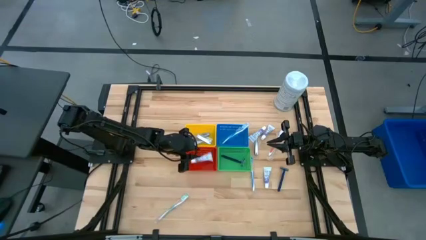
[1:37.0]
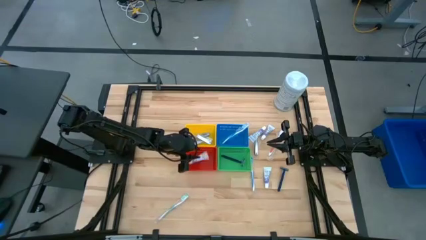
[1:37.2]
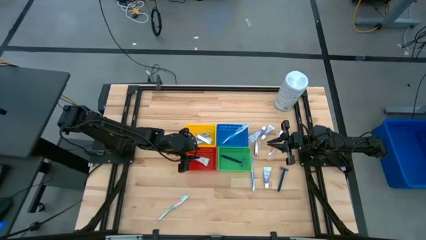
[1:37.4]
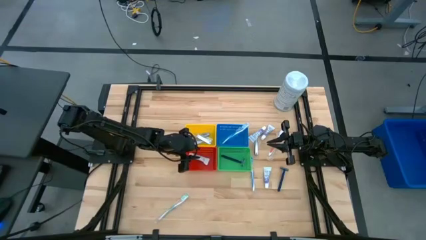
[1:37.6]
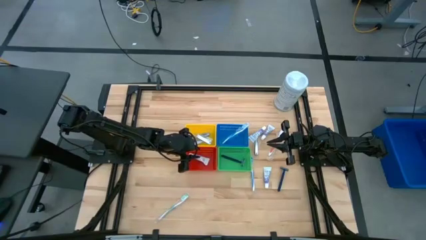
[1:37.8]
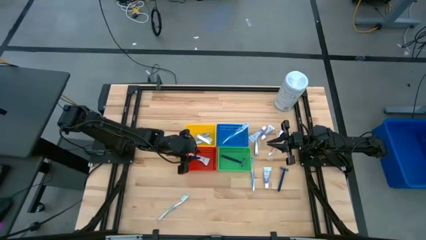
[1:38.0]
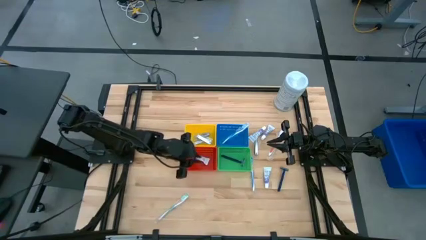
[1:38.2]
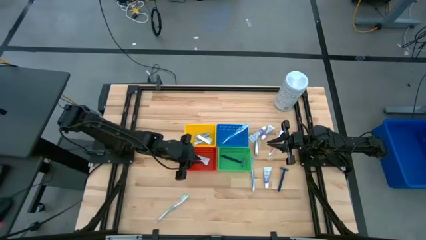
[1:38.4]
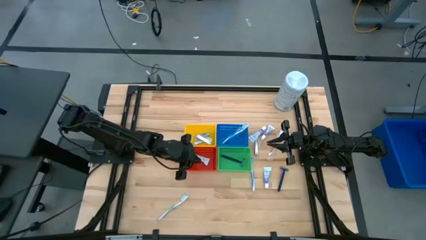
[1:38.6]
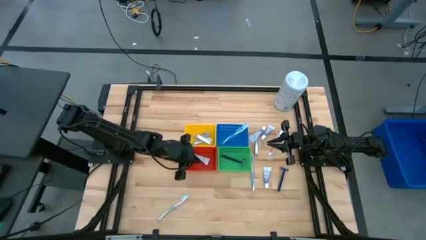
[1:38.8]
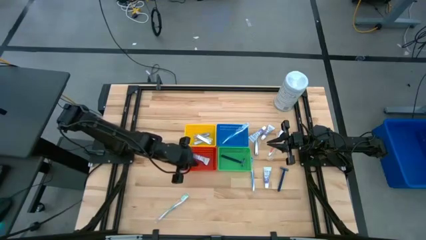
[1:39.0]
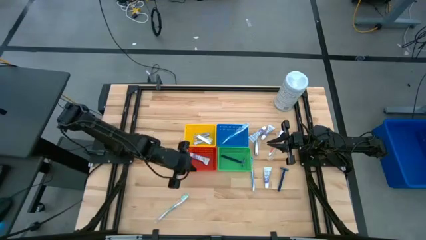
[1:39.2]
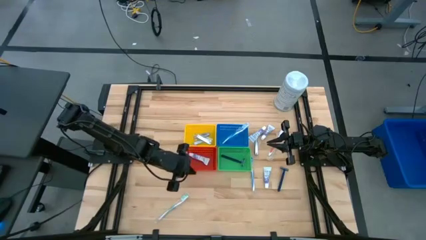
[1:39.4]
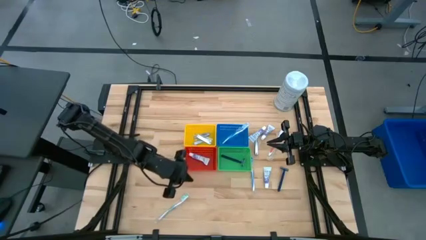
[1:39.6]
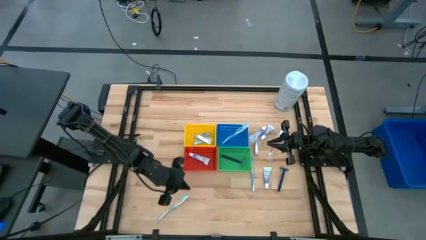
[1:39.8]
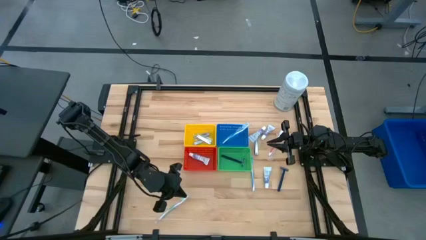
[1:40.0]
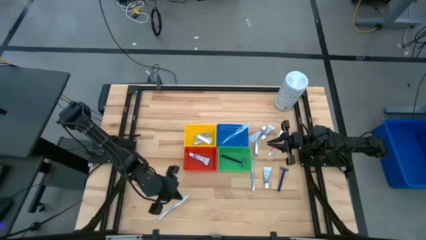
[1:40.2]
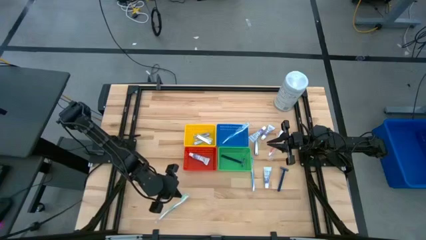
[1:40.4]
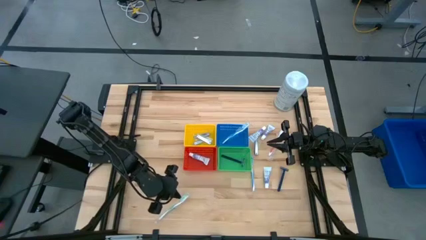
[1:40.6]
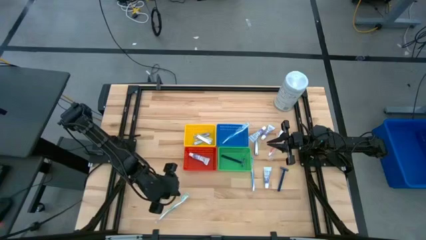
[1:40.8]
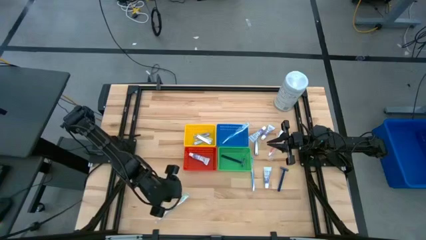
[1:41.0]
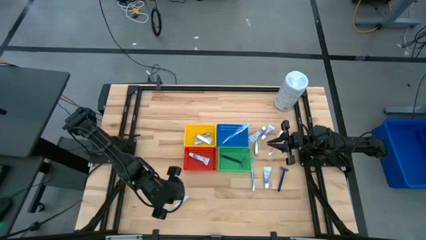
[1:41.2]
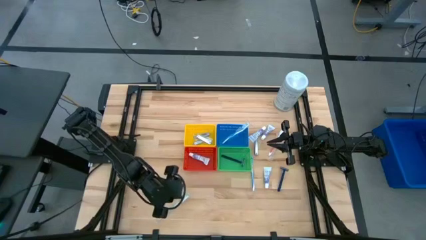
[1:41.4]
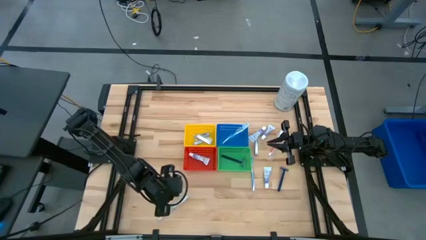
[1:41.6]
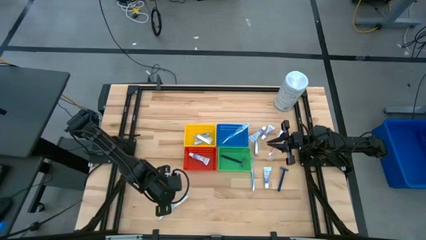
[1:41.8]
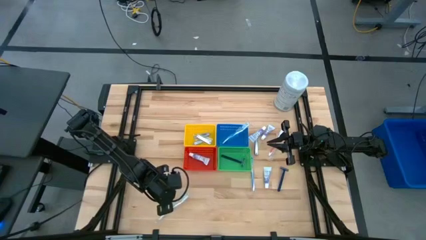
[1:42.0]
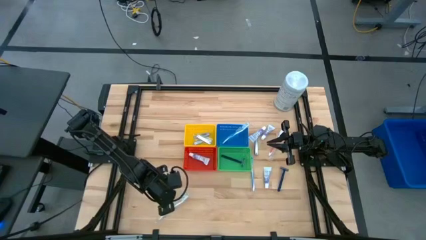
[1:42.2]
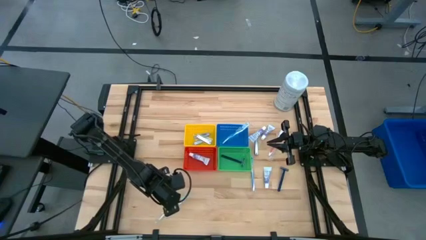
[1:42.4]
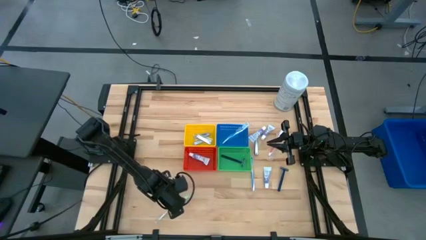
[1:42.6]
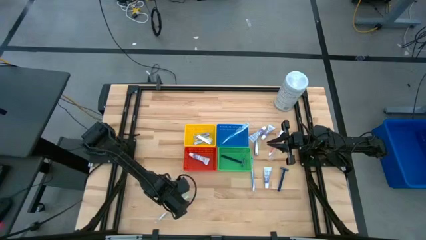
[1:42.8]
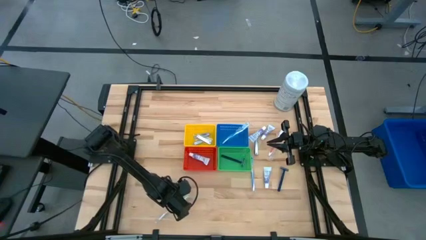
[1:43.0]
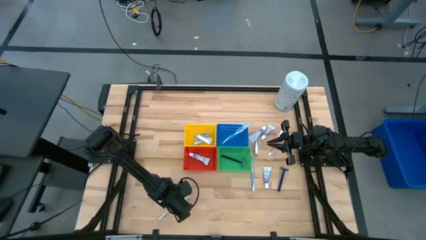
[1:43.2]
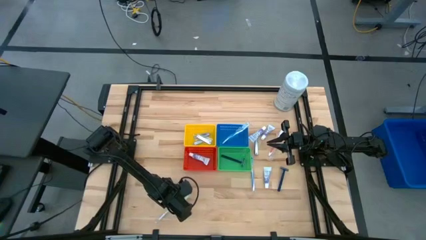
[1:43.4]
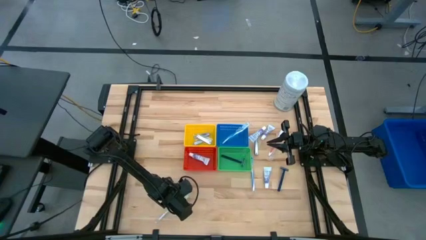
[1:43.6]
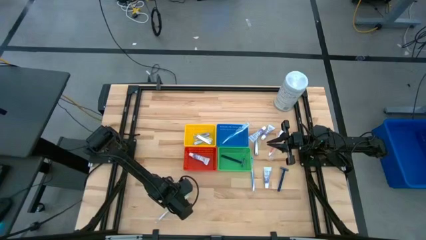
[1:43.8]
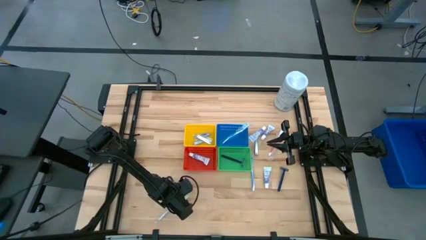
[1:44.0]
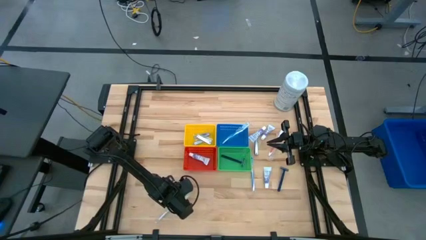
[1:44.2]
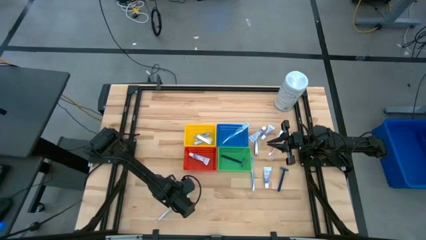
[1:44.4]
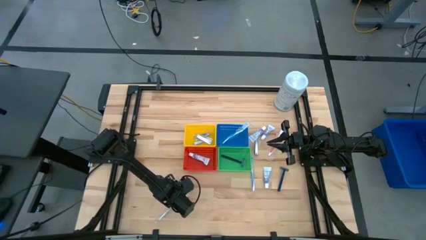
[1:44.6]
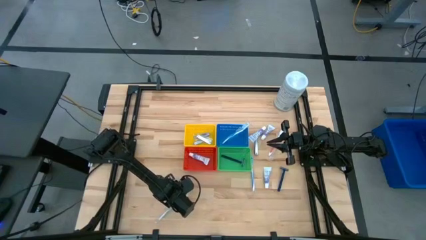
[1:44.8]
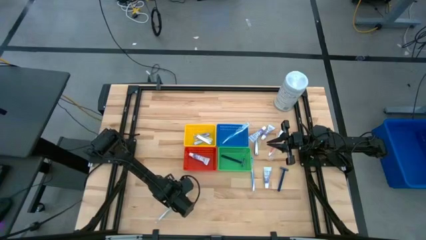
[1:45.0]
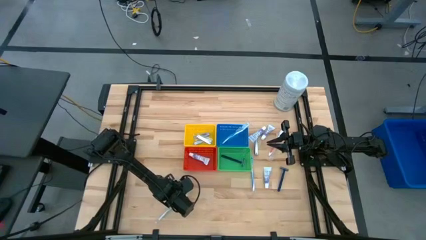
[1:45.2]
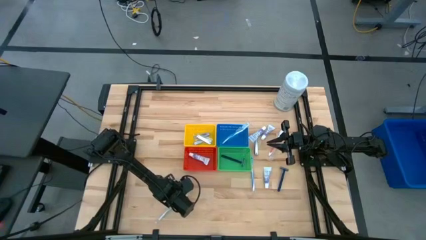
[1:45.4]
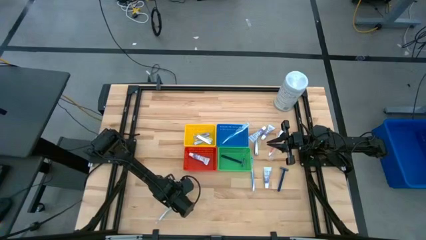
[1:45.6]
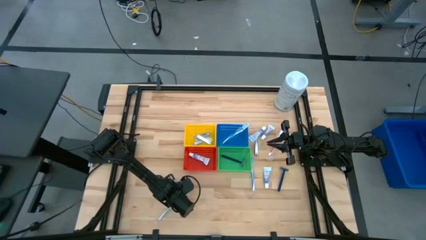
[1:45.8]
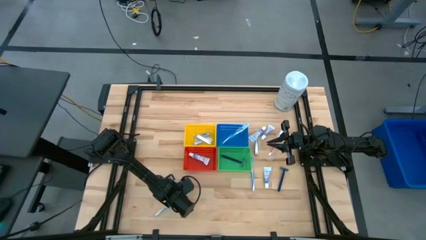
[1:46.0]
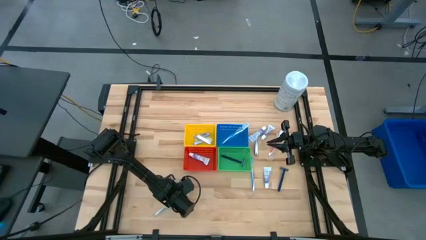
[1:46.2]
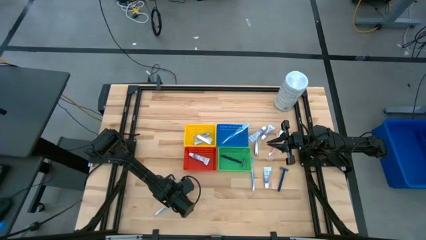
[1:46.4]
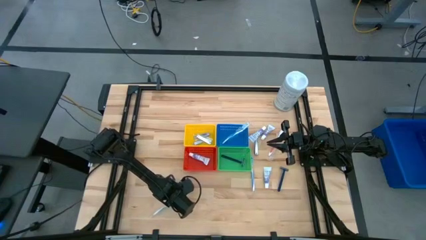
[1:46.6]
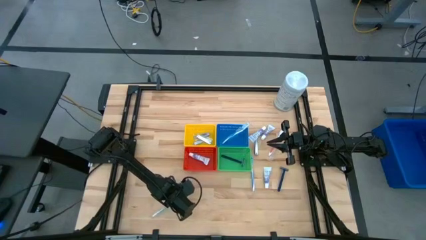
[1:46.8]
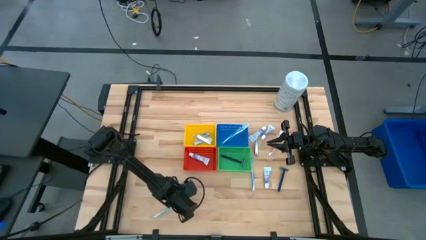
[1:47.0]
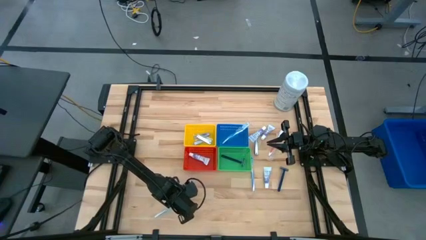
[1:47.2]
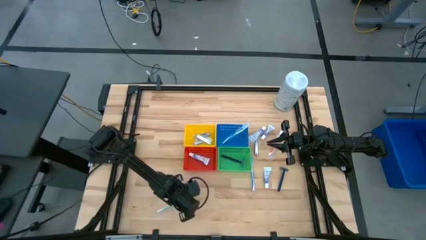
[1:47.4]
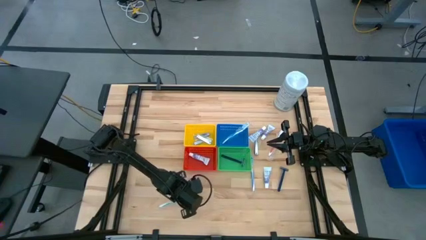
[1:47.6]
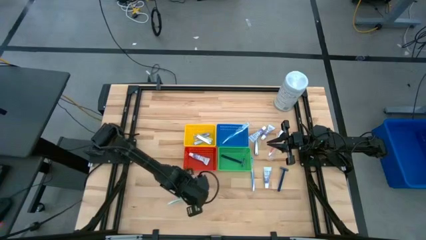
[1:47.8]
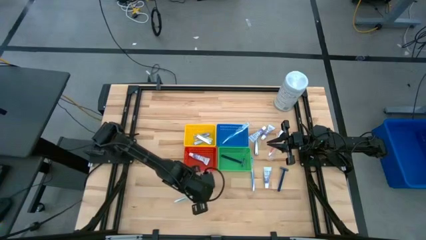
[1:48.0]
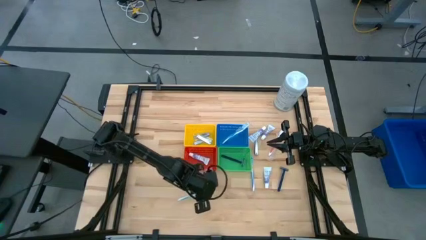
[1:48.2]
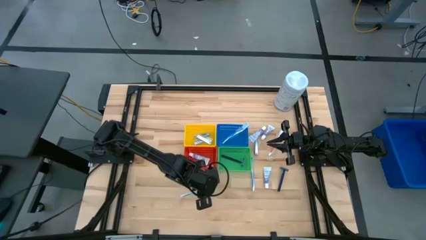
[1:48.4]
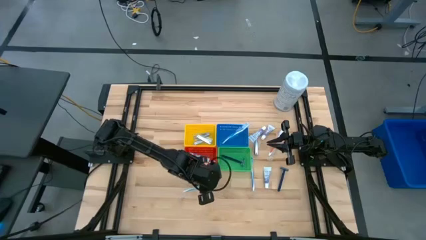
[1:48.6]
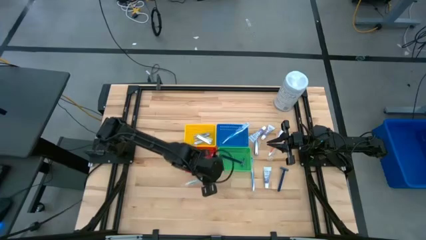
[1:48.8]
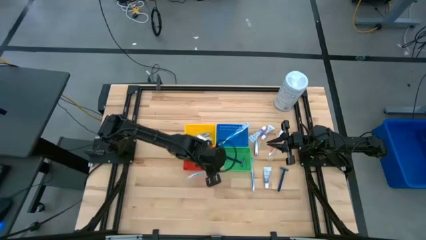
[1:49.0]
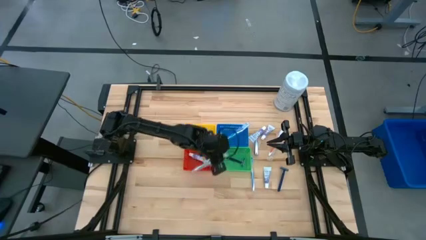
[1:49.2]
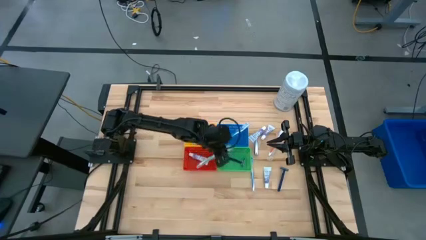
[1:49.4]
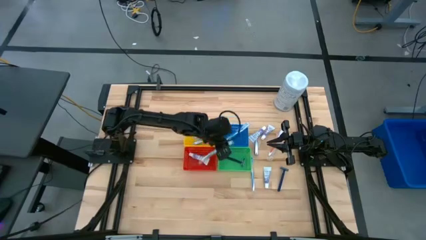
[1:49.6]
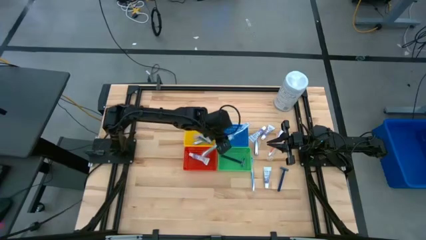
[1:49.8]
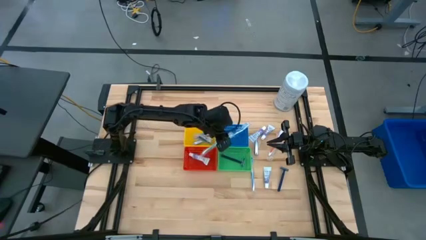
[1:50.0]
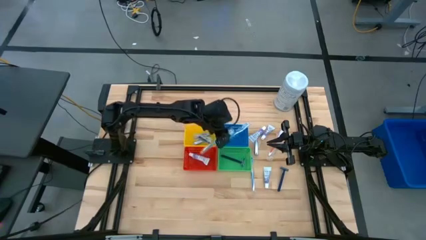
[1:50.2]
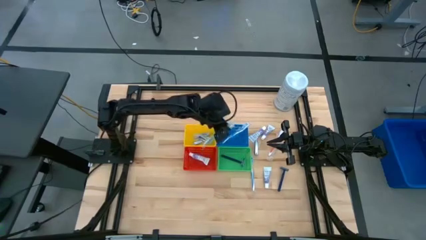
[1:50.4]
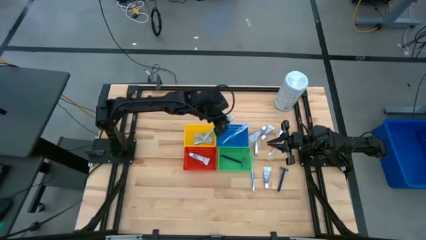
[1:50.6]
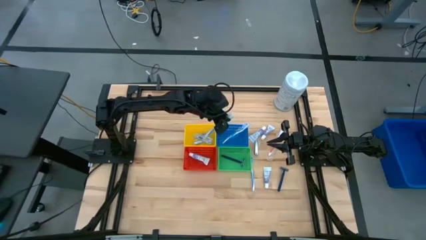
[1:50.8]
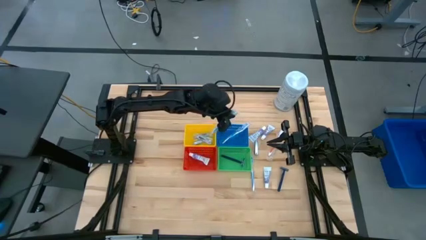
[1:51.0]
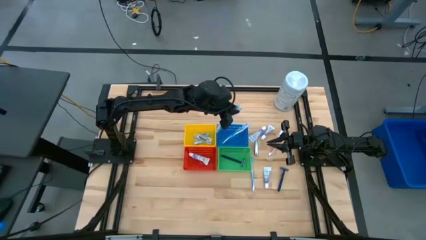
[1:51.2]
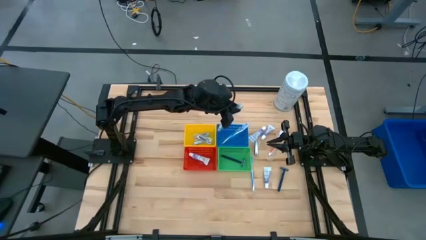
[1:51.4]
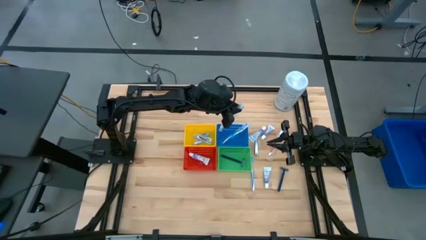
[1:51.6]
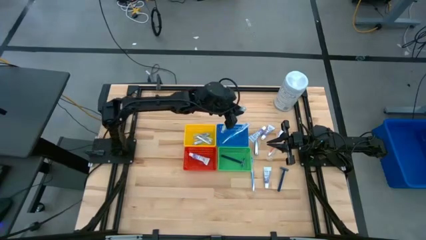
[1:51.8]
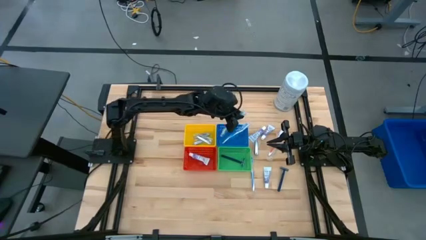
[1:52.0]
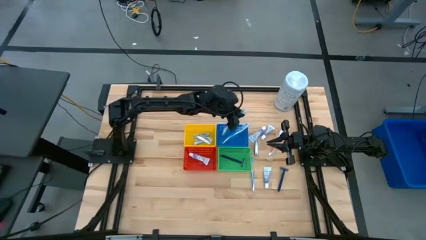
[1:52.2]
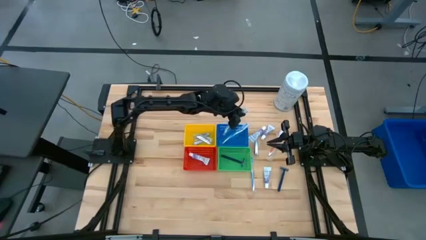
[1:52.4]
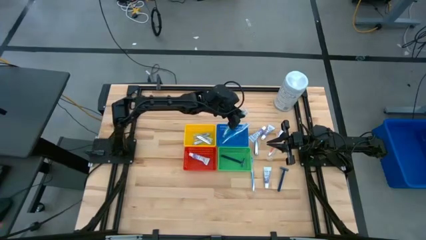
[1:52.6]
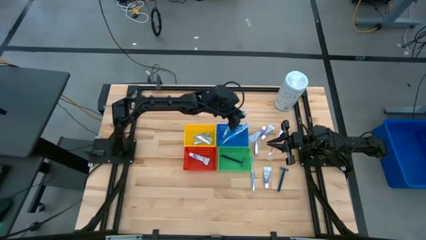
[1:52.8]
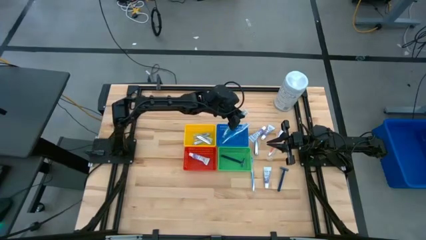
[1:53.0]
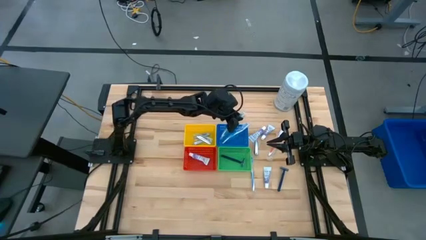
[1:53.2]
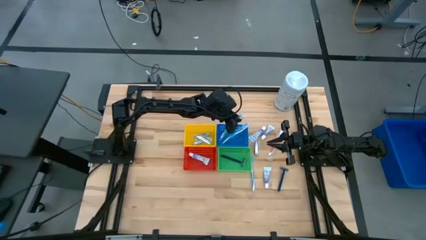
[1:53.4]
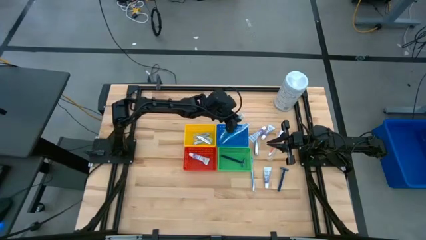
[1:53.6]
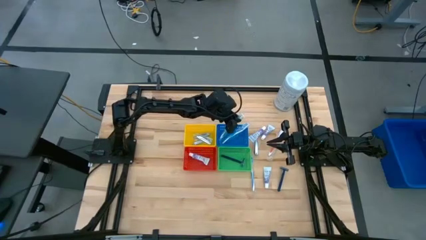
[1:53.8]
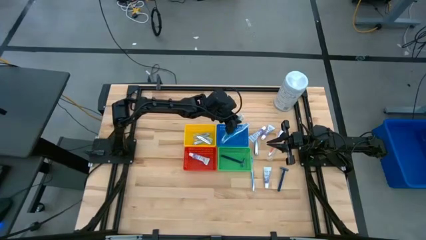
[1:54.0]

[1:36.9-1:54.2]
Task: Pick & Place Travel size toiletries
Put the green toothbrush into the blue bin

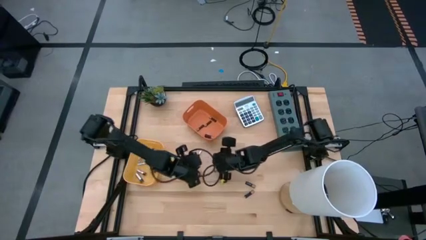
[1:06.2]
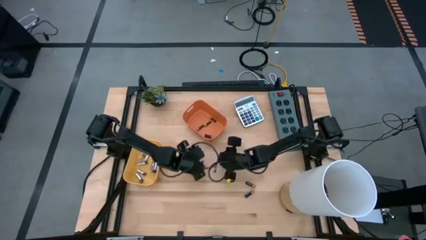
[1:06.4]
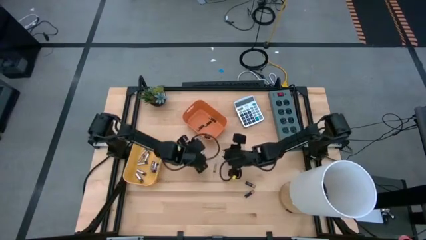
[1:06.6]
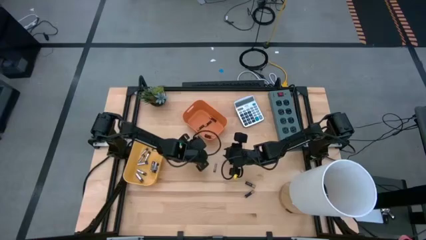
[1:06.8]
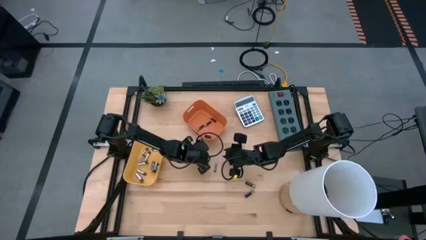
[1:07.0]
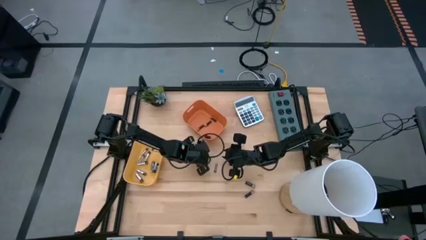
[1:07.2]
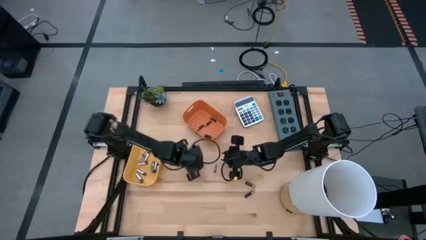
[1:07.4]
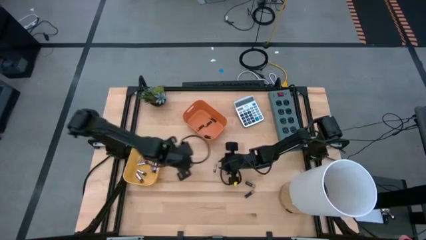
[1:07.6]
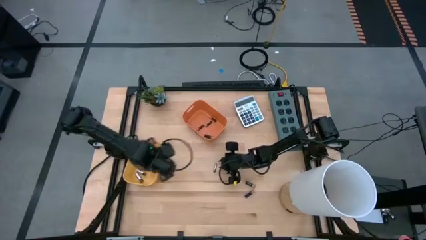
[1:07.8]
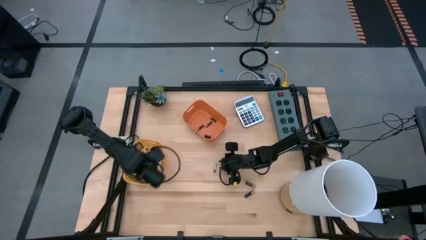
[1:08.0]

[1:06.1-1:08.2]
Task: Sort batteries
Put the silver battery into the yellow bin
